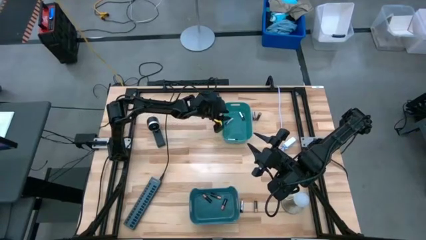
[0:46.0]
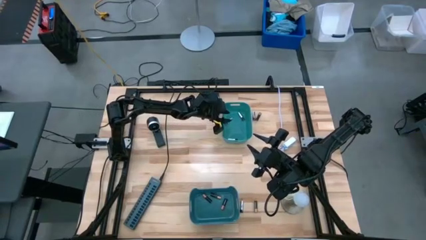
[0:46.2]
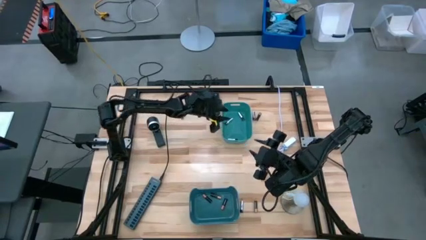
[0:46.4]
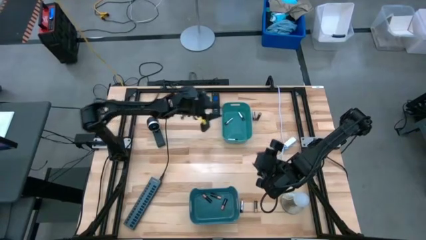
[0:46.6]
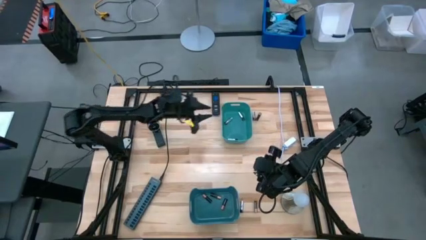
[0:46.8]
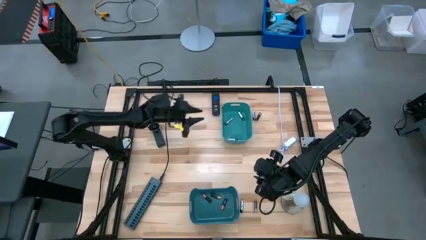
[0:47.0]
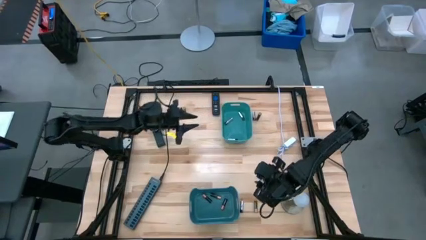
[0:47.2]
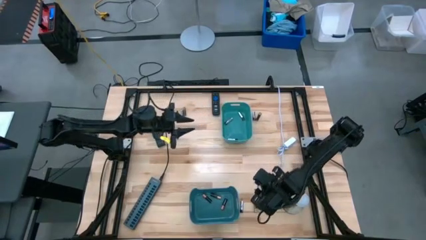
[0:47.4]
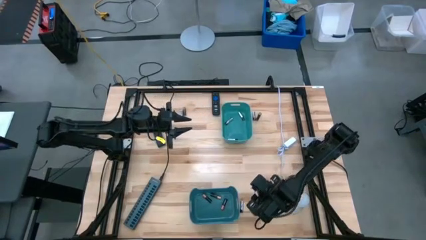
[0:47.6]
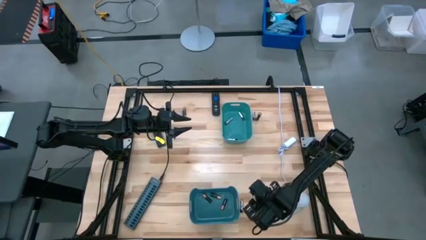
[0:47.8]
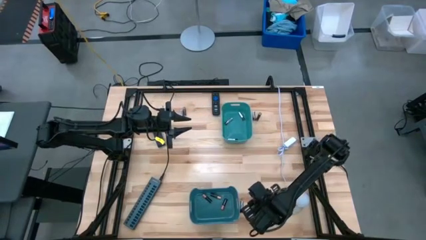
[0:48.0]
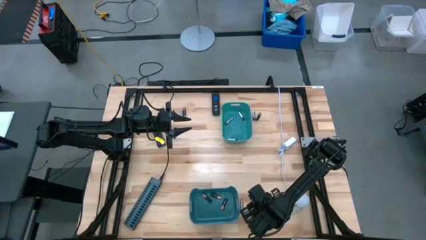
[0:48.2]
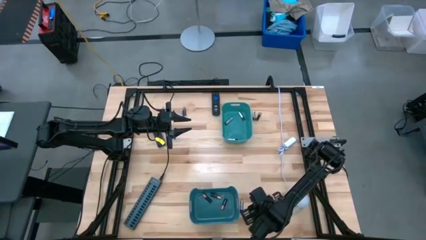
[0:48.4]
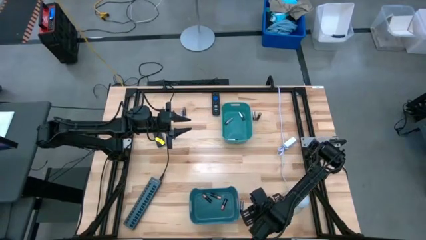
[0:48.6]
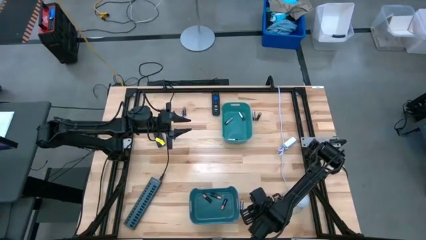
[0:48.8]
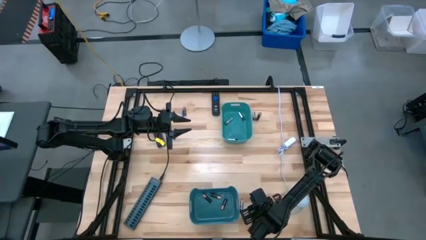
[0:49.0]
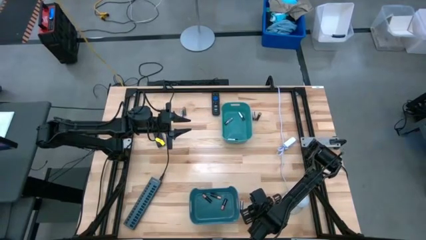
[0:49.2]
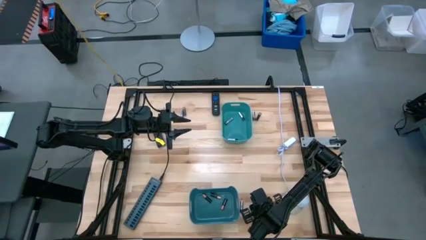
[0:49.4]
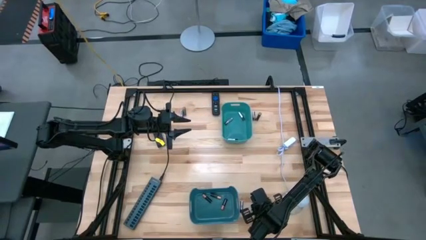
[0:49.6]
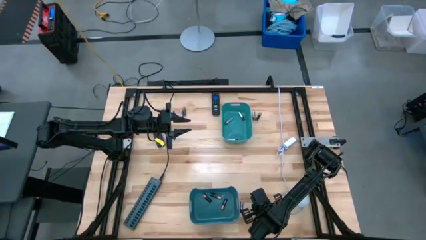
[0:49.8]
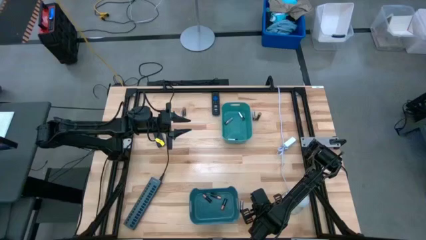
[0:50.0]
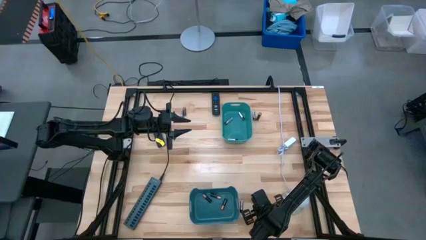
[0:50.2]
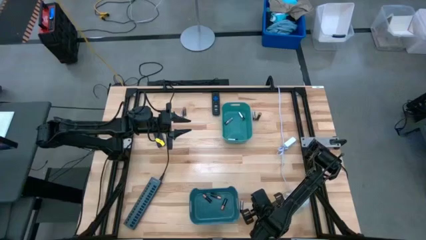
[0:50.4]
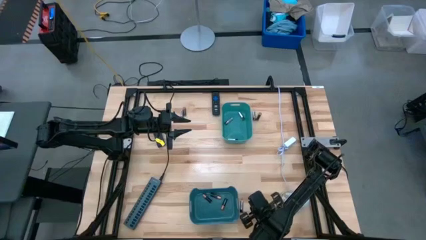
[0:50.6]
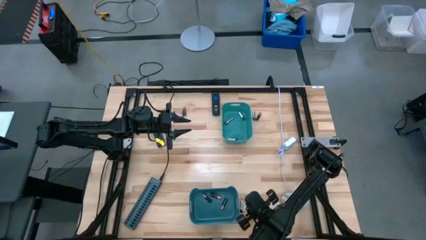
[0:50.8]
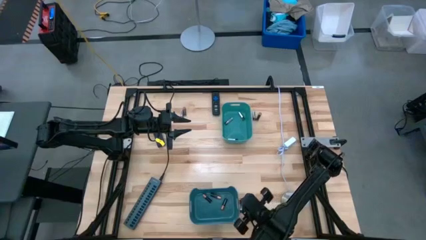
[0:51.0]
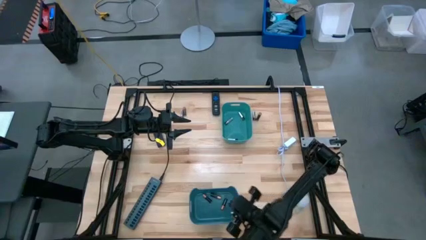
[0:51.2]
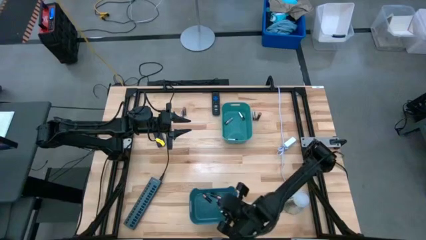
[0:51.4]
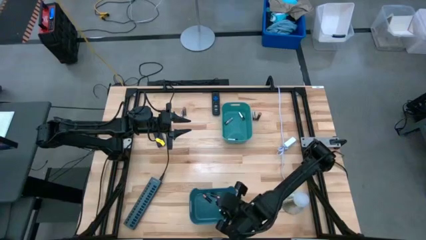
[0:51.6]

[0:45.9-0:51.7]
Task: Sort batteries
Put the black battery into the blue bin

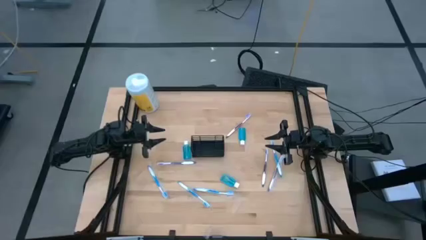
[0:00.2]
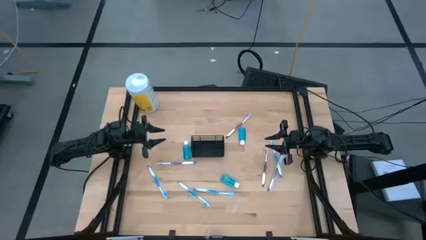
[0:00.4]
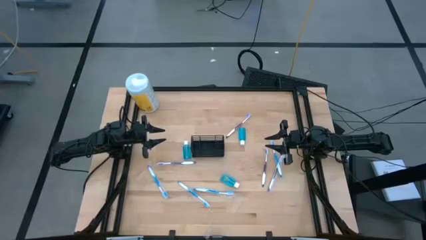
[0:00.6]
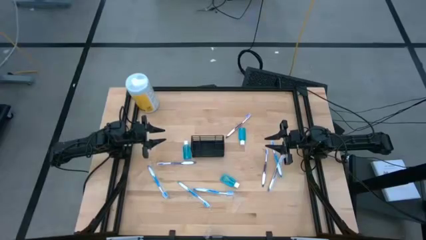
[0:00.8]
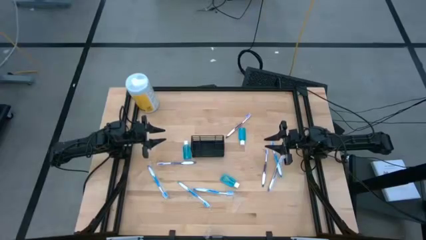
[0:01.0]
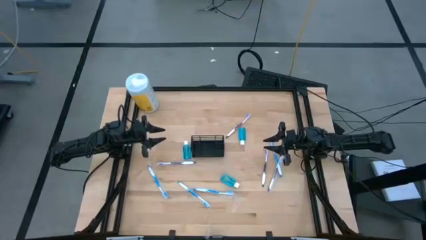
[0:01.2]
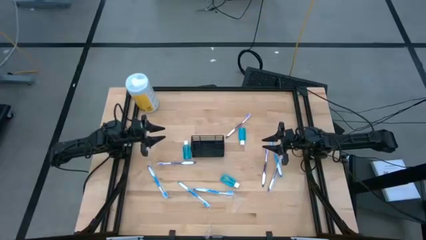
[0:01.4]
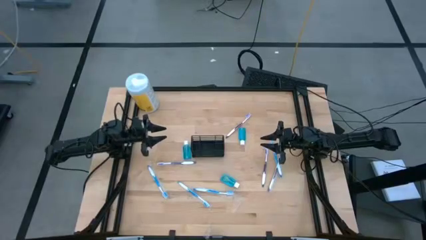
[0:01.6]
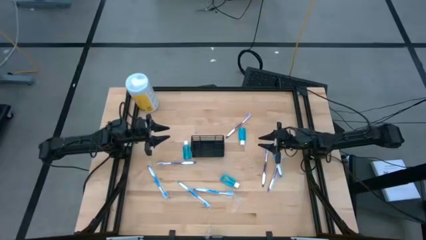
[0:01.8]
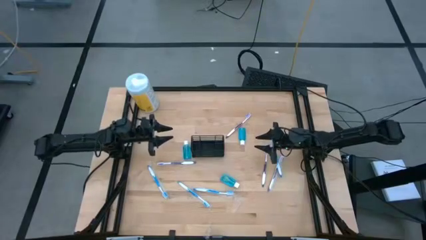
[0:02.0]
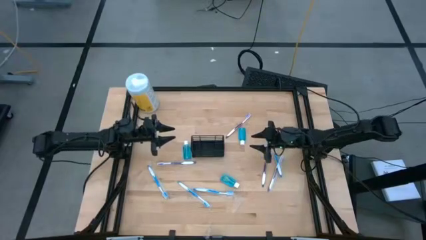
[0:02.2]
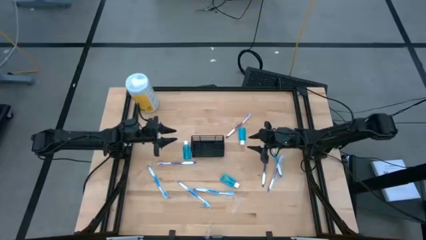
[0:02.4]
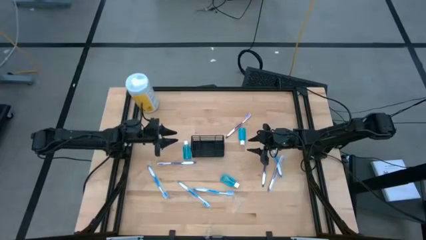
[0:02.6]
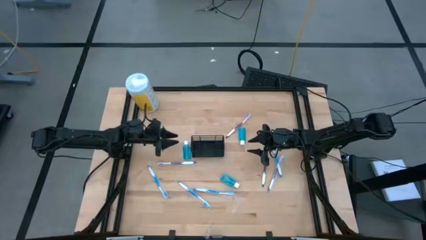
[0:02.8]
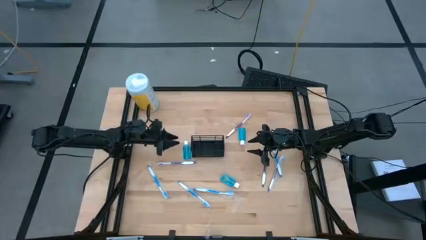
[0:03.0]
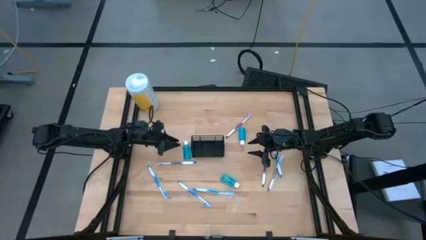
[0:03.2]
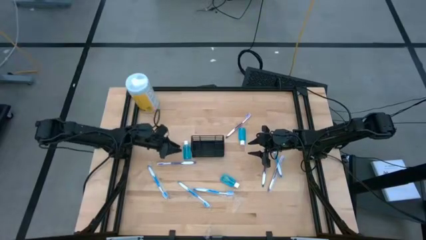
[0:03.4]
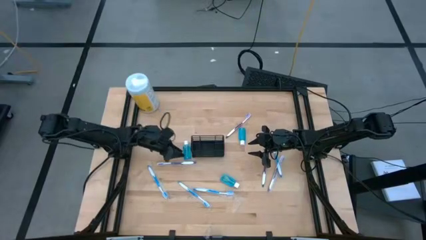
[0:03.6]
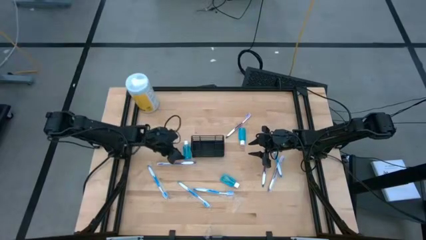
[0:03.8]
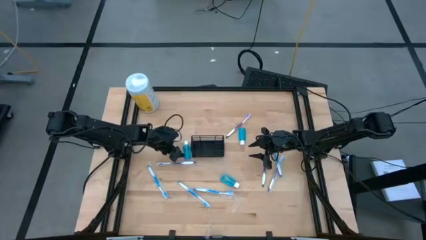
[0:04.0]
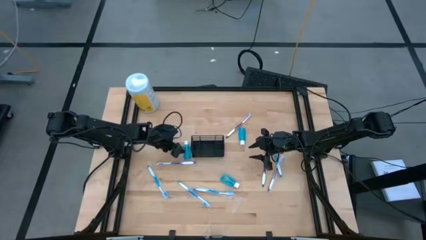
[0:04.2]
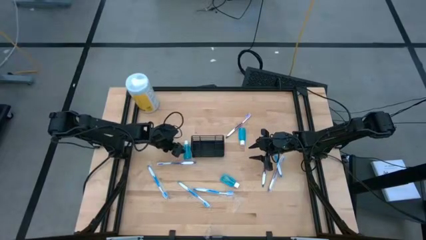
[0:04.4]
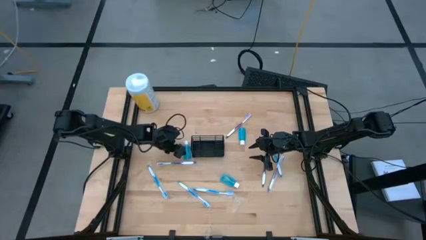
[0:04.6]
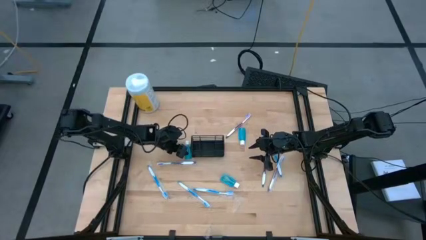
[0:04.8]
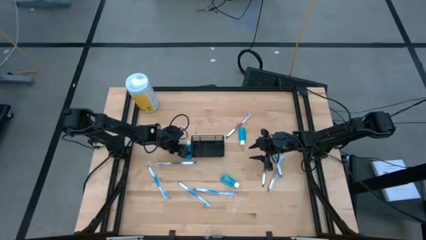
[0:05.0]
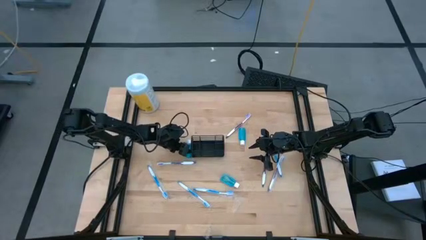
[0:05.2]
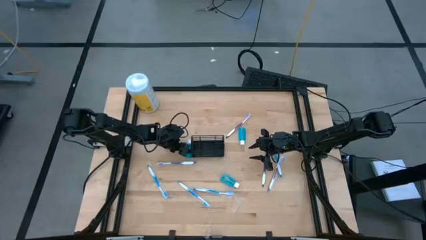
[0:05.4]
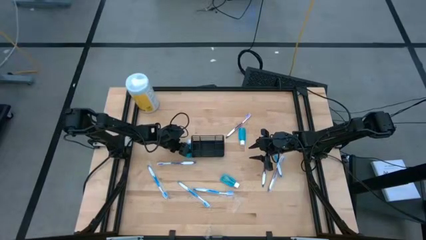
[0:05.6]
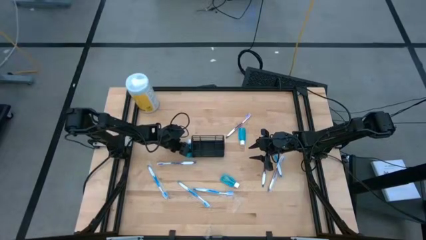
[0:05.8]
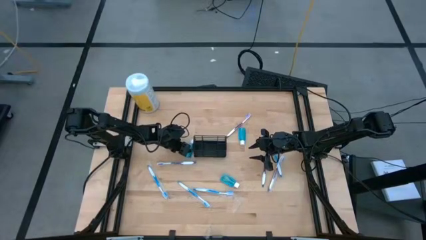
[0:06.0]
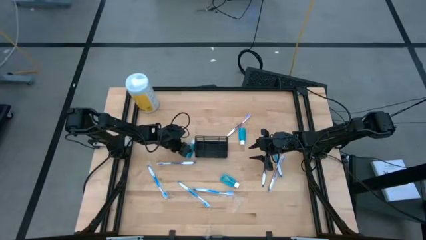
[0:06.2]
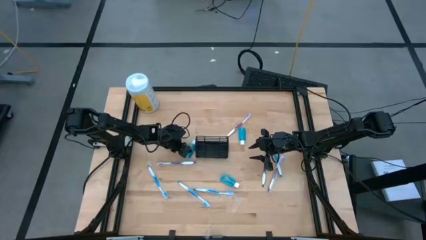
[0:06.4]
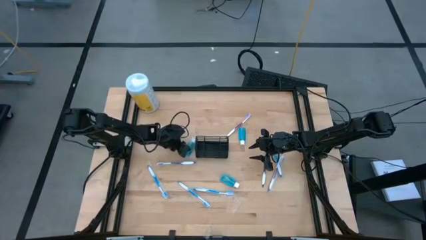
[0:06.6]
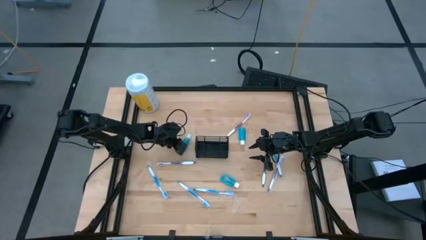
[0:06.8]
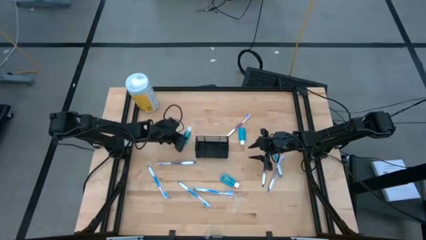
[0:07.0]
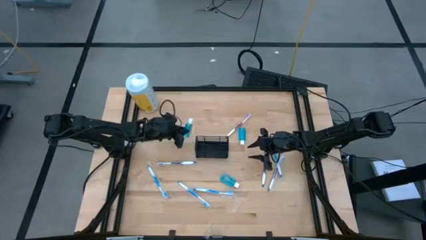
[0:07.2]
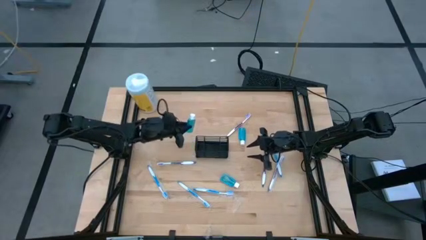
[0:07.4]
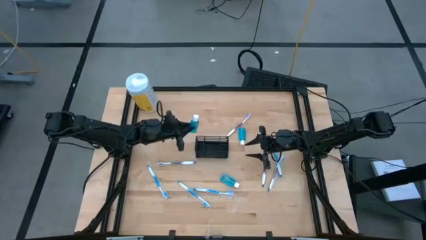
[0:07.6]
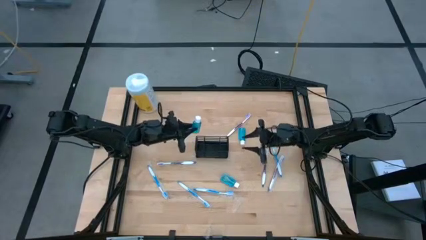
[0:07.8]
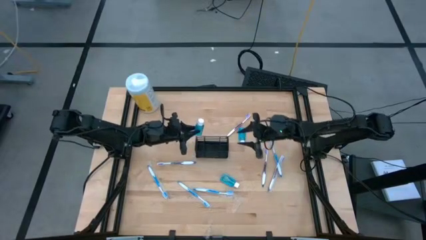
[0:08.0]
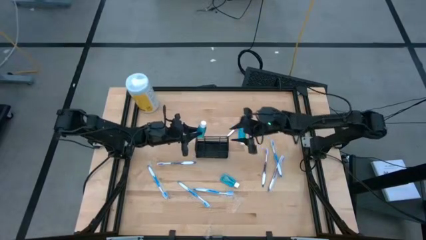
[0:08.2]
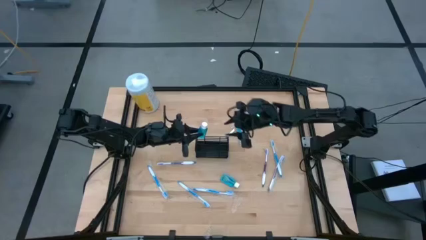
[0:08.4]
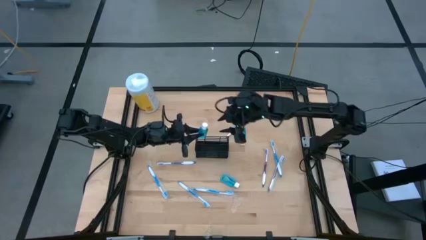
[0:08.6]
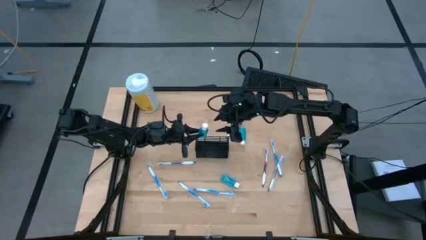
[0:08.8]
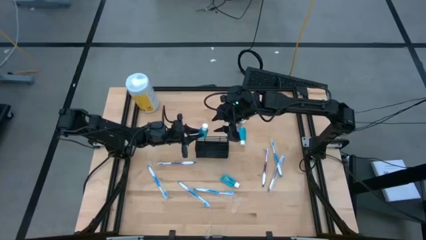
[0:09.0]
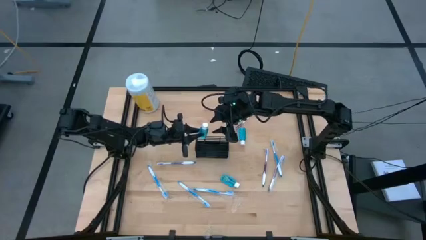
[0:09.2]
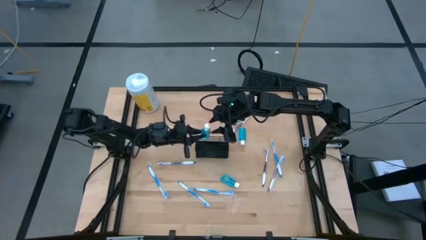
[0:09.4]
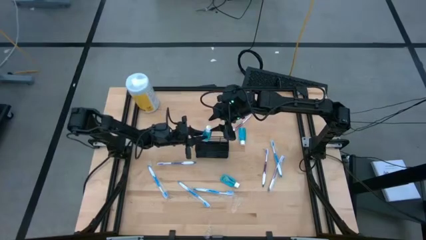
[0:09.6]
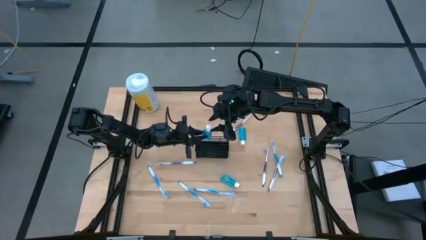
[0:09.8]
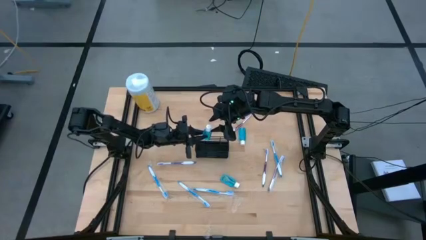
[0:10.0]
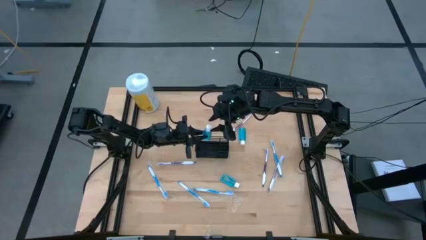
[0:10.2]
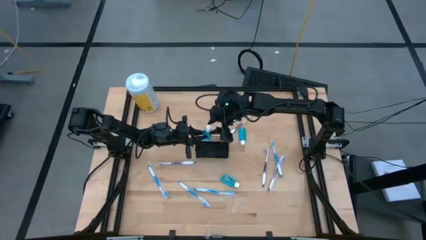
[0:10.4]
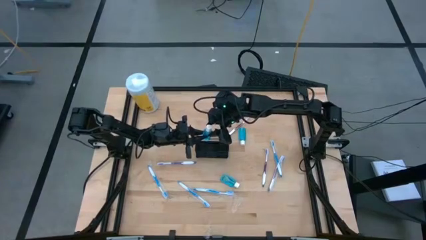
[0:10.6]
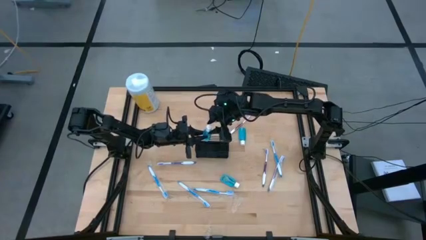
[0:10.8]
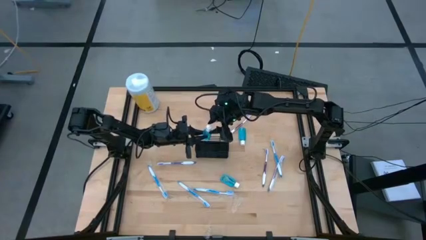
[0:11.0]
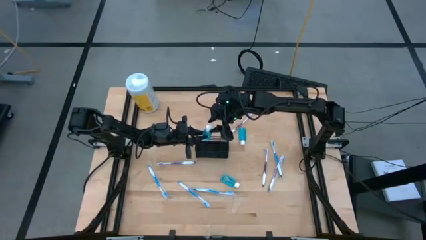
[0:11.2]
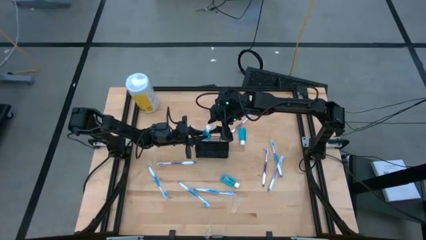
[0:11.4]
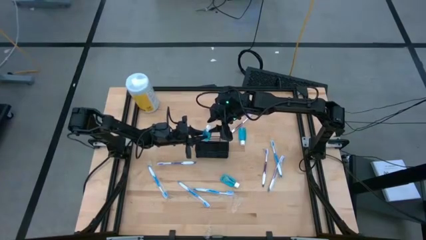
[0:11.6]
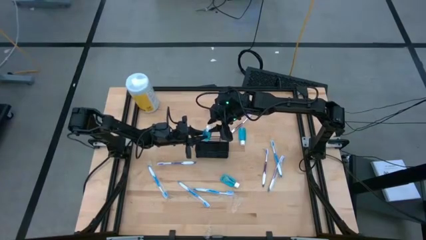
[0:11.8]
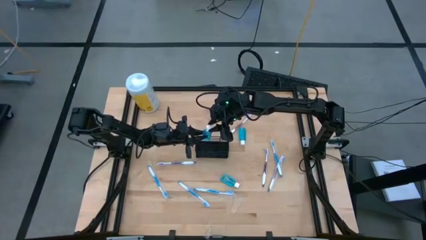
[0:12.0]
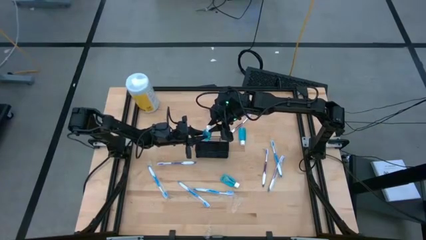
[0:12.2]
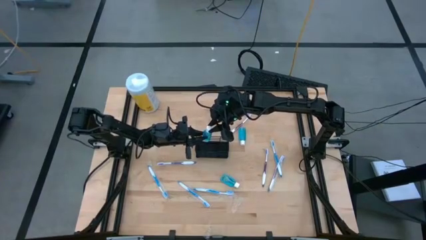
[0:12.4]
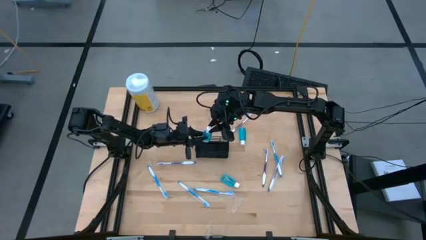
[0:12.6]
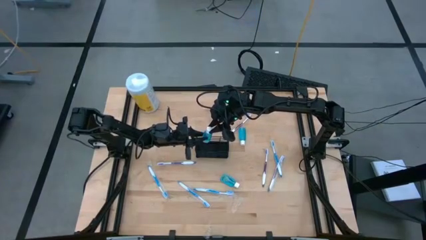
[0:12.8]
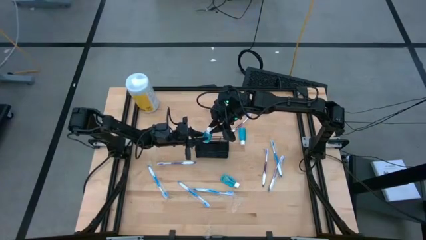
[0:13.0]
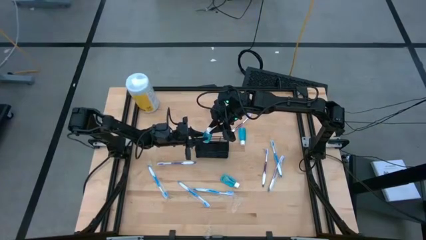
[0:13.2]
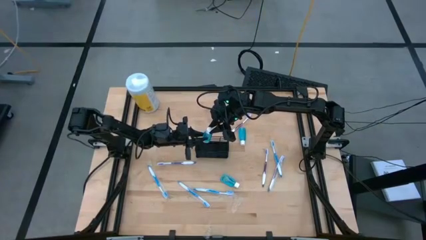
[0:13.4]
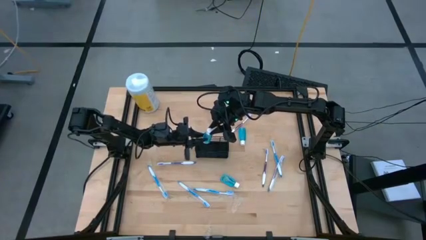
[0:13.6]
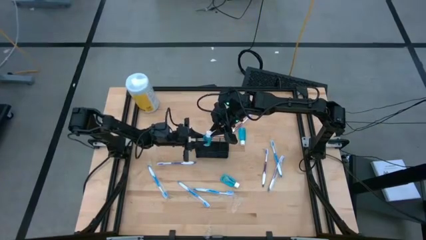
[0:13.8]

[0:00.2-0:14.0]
Task: Pick & Place toothbrushing station
Put the blue mouthwash into the wire organizer
